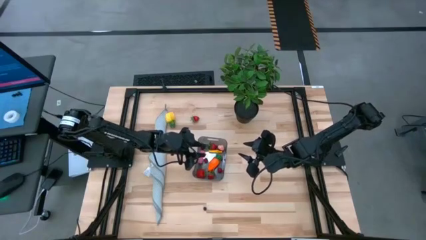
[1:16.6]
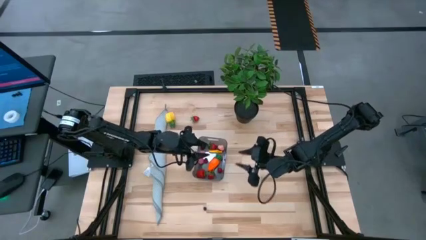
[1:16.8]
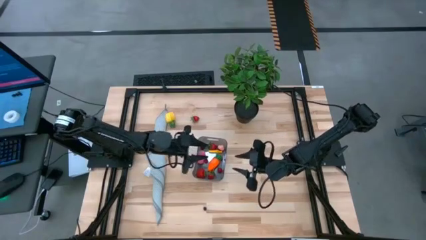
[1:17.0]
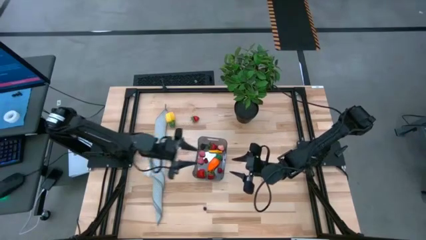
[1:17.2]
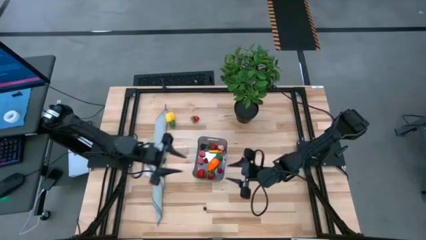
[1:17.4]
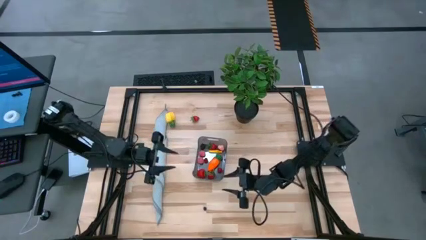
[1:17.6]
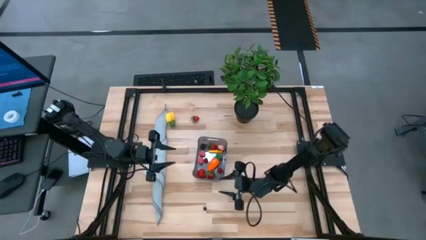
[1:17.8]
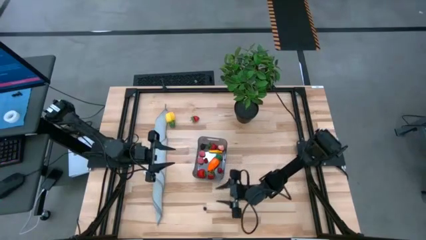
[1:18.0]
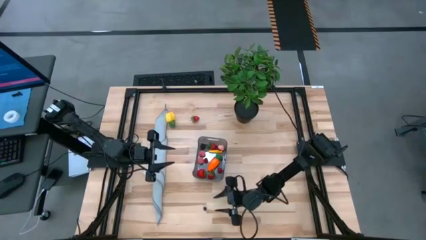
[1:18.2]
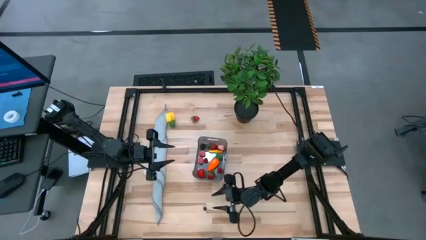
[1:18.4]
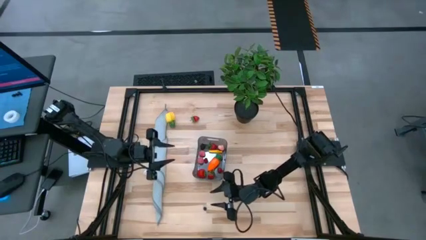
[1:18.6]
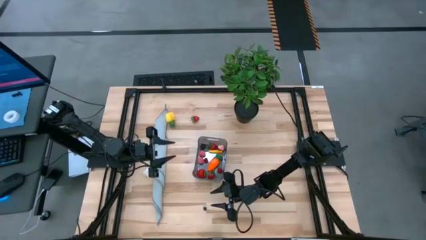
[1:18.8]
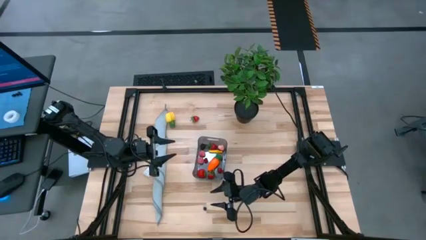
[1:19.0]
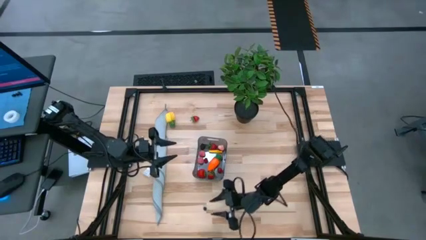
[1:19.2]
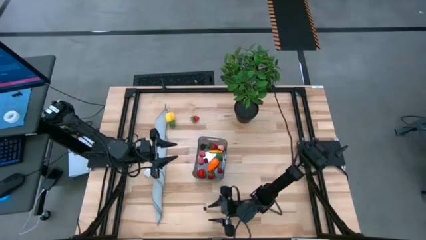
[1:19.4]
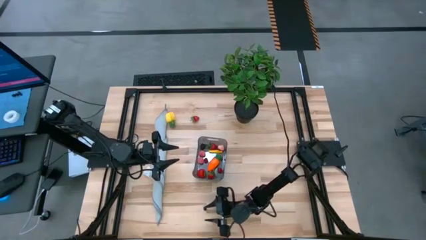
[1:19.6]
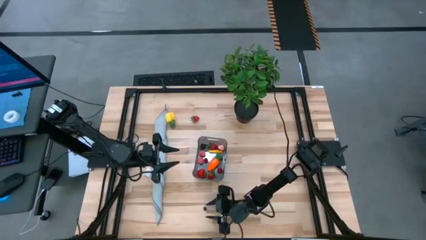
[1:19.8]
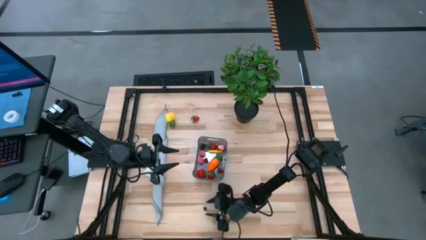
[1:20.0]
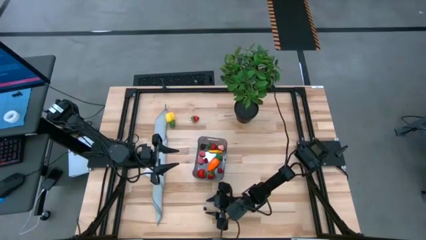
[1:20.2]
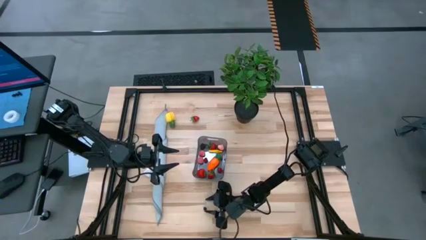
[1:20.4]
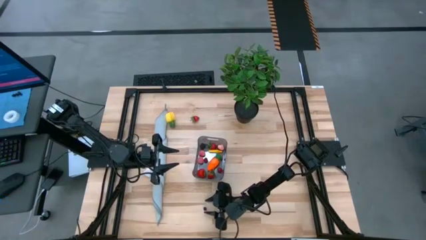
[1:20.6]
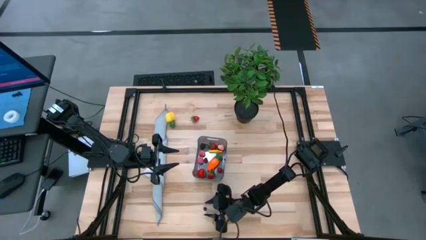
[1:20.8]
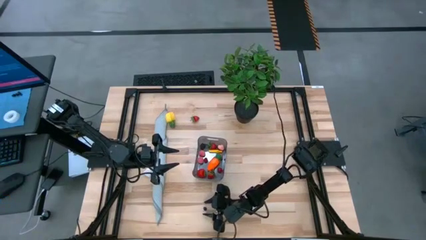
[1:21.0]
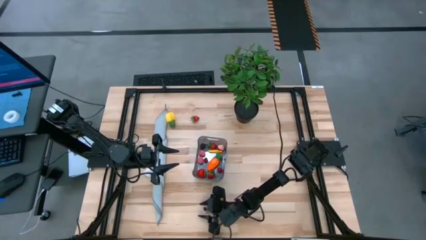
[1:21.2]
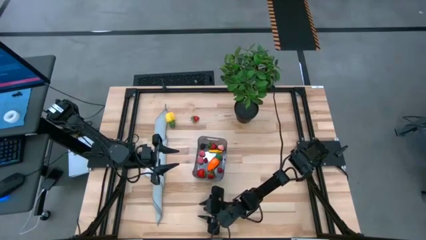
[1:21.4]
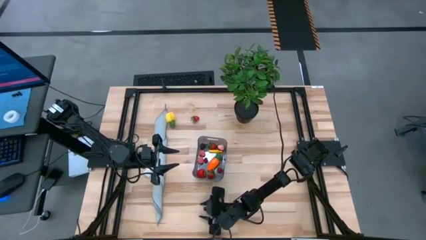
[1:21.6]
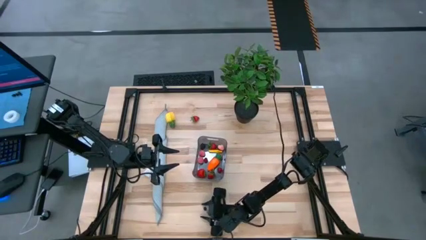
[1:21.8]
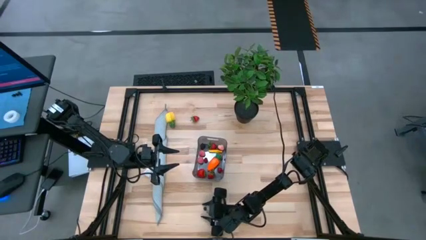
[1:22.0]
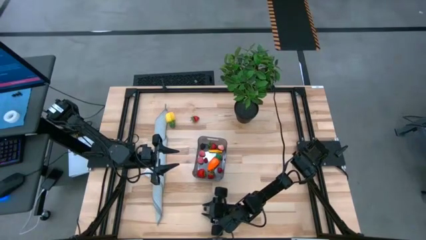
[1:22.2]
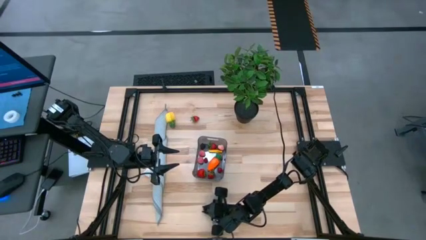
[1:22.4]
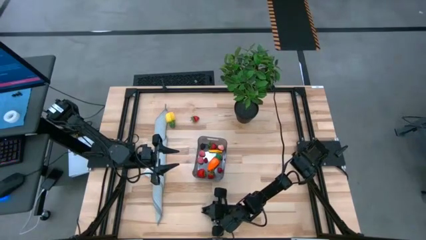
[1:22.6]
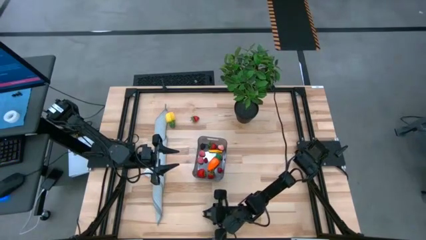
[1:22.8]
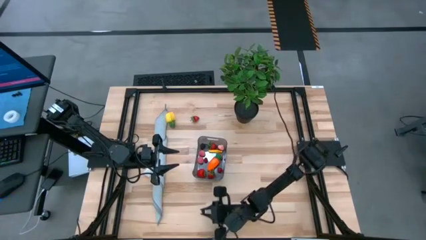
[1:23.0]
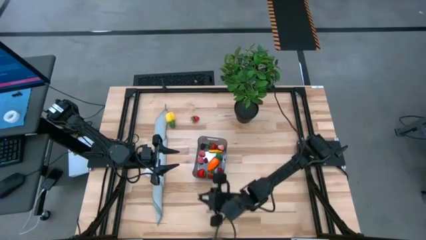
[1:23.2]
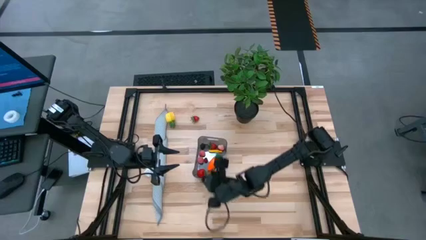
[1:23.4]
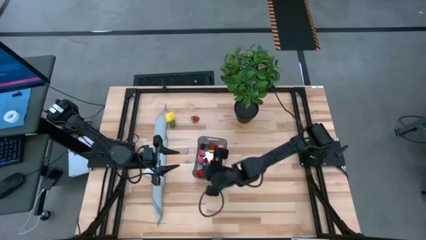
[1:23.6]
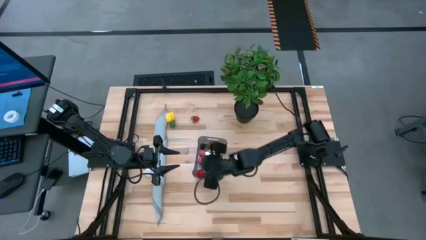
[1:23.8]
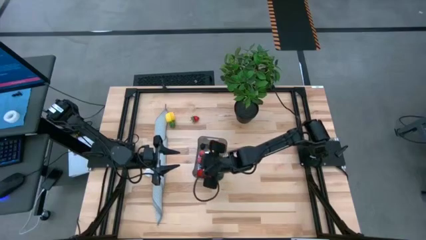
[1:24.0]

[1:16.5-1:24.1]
Task: Pick and placing Produce into tupperware
Put the blueberry into the bin

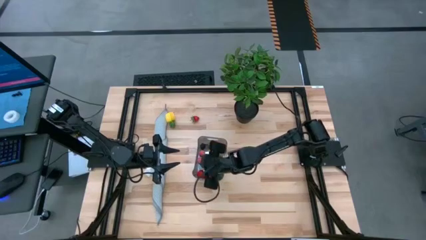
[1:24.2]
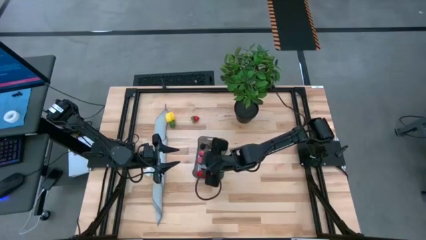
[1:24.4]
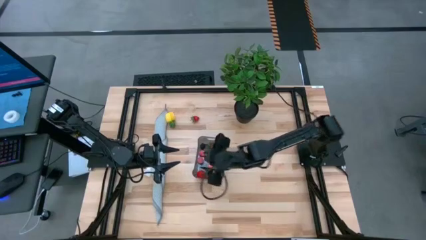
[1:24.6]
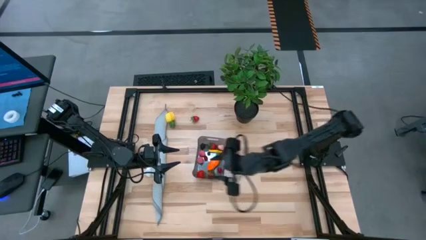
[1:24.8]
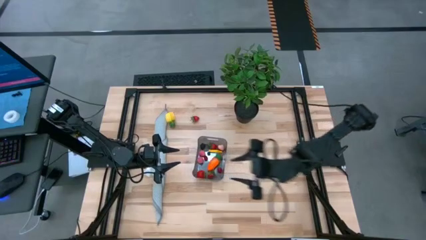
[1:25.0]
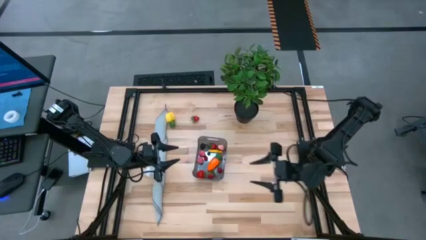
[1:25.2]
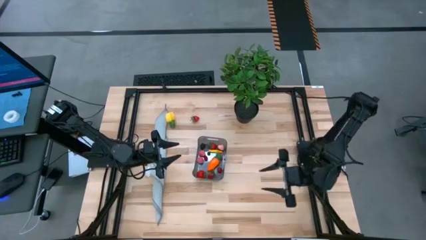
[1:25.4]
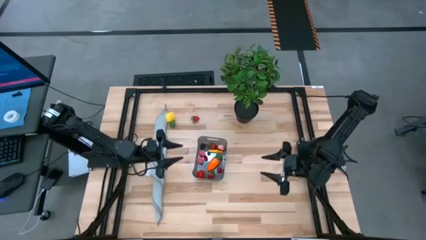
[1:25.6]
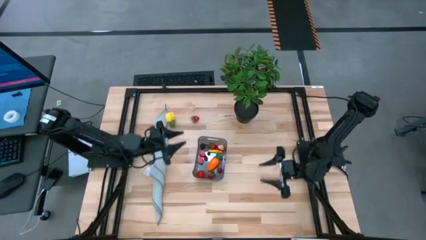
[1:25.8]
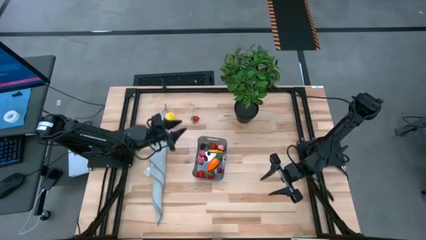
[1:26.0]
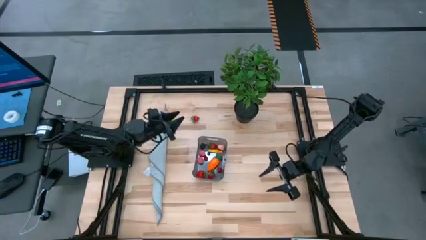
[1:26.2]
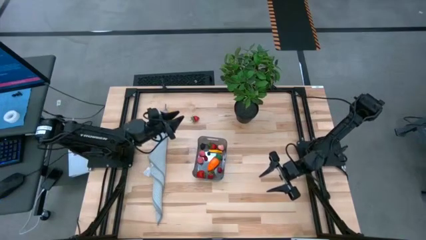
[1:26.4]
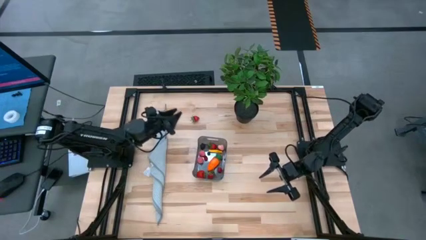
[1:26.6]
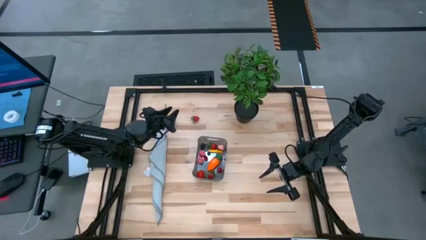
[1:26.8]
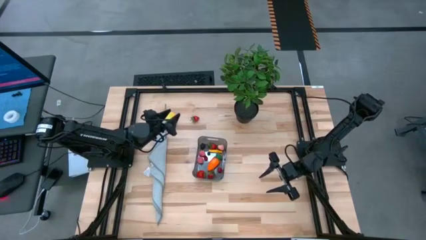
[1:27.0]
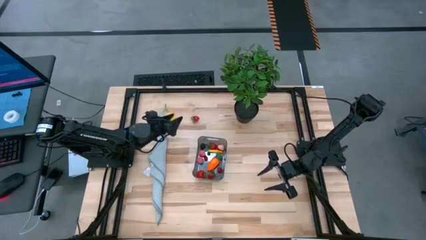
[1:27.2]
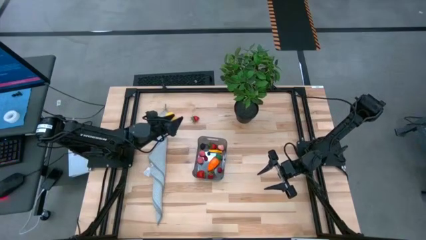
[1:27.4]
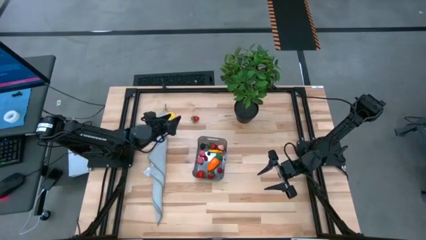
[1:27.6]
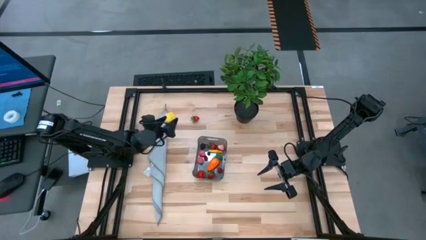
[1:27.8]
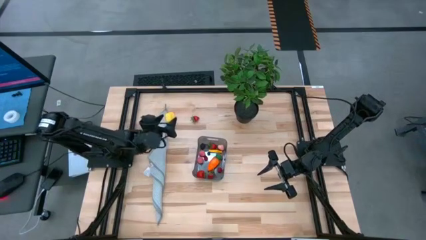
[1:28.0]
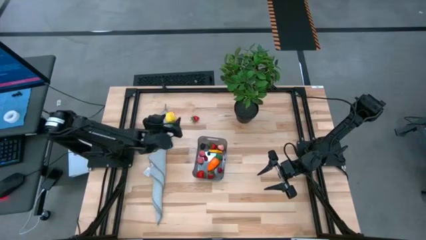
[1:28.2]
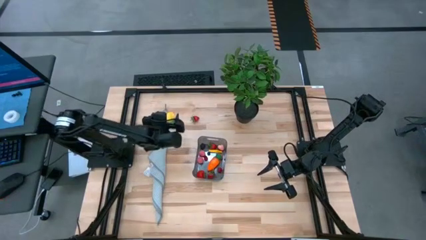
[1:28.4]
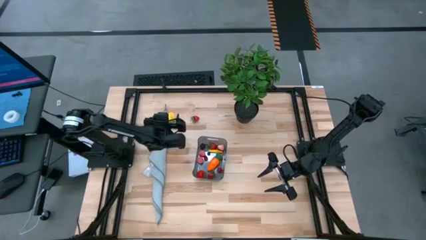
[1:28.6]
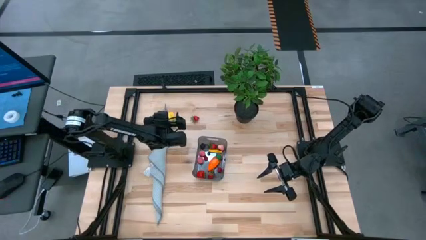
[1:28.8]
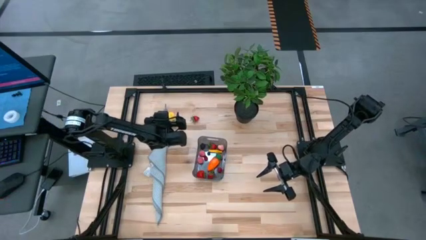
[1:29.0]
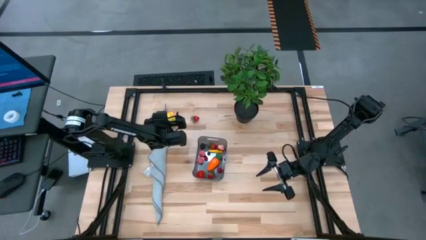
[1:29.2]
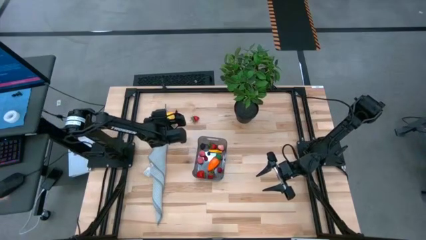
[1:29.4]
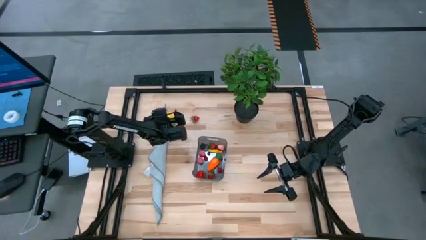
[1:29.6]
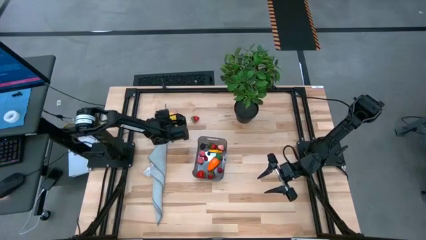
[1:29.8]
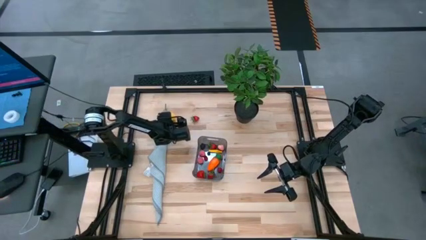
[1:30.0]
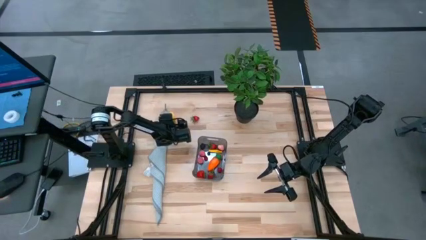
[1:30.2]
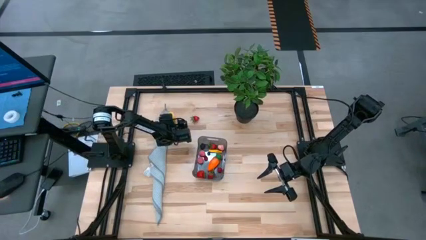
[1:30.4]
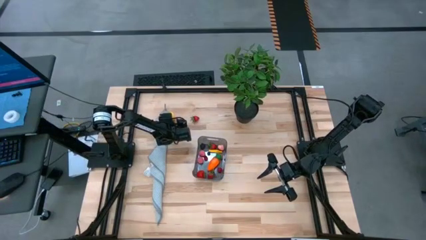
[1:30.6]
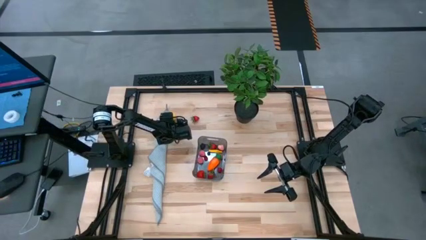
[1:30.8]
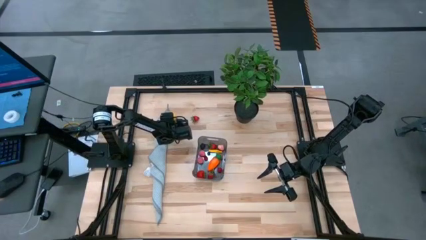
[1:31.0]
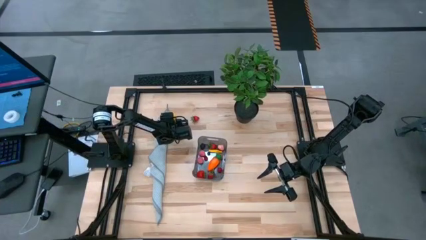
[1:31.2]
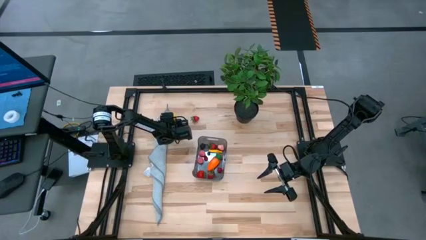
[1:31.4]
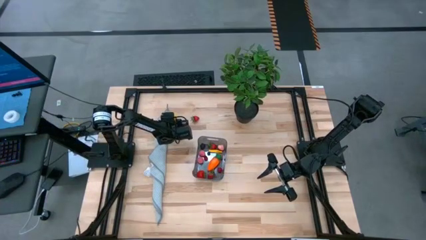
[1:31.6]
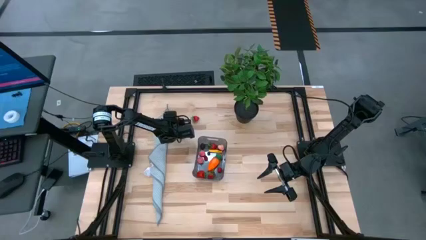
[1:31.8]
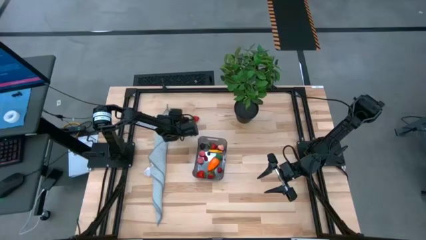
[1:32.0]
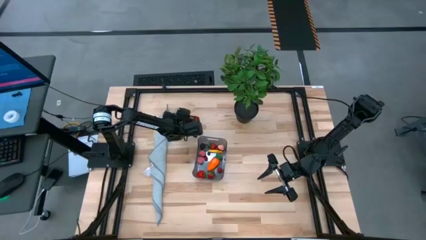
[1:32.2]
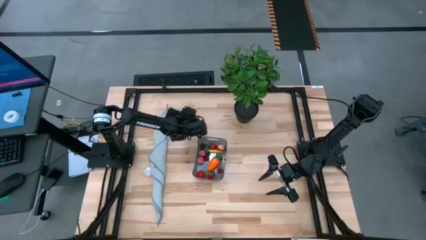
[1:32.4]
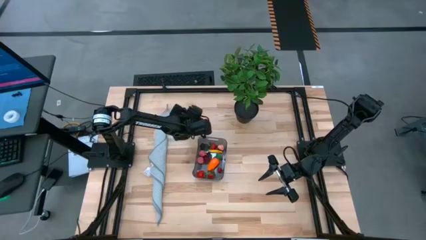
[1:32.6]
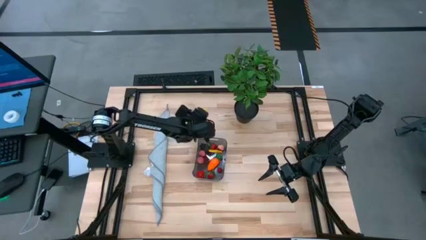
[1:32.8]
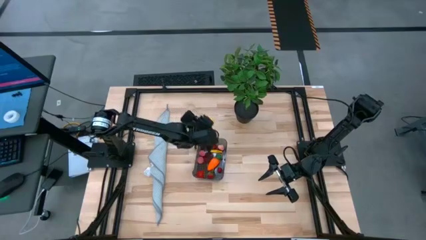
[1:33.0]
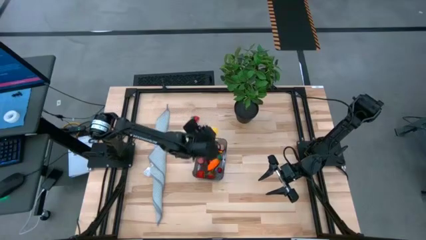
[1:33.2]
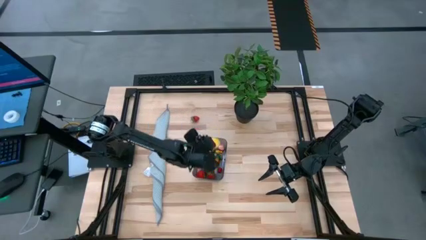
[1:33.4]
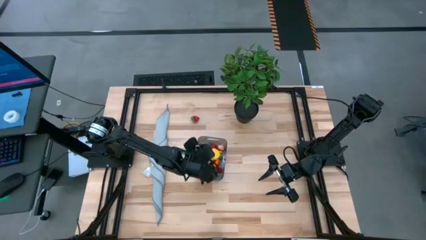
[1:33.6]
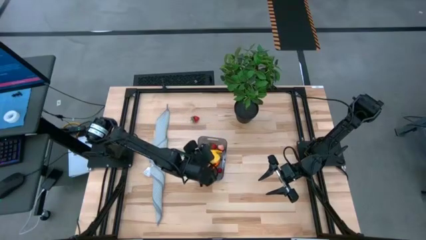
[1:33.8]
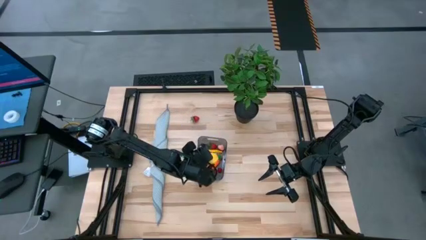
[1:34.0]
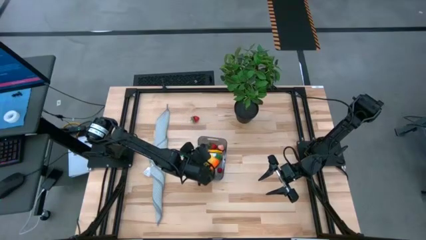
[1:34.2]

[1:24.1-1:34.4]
Put the pineapple into the bin
